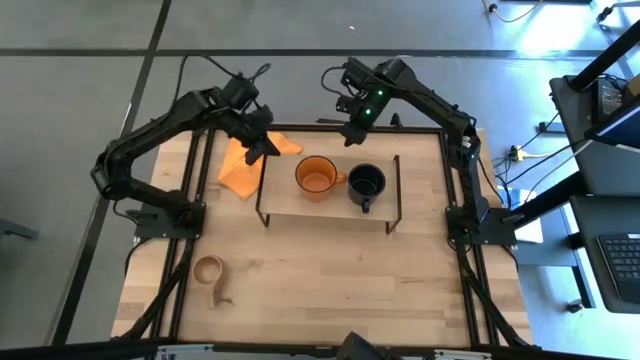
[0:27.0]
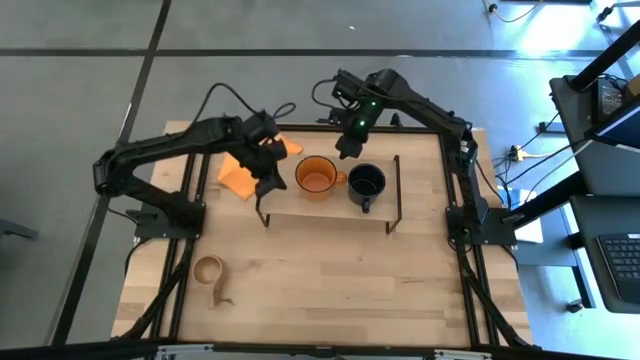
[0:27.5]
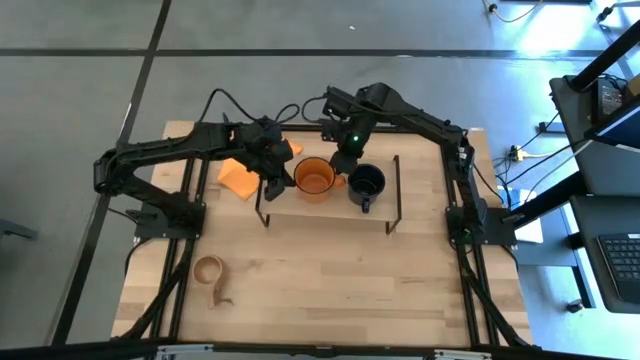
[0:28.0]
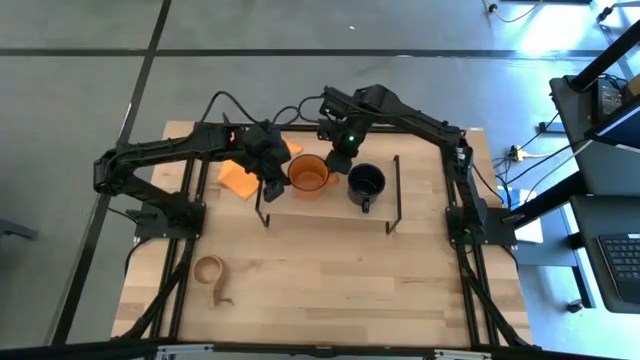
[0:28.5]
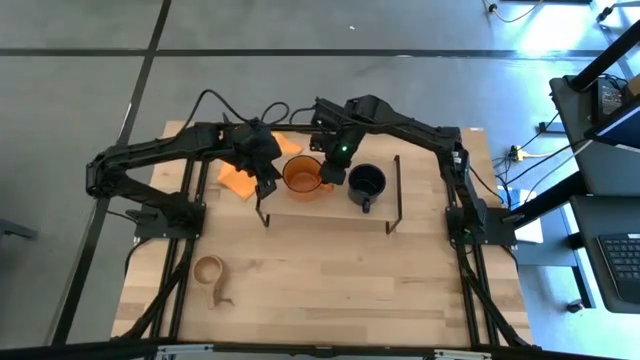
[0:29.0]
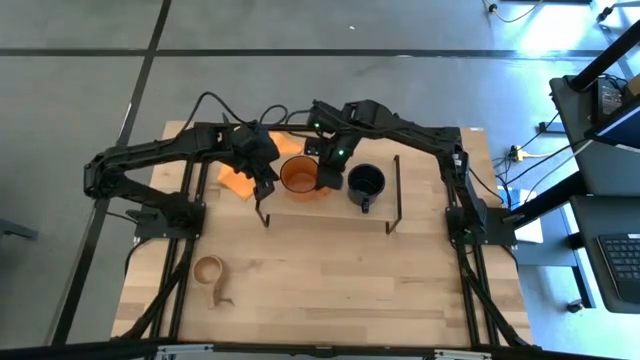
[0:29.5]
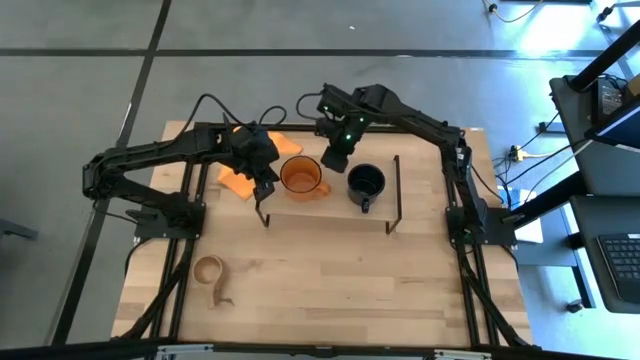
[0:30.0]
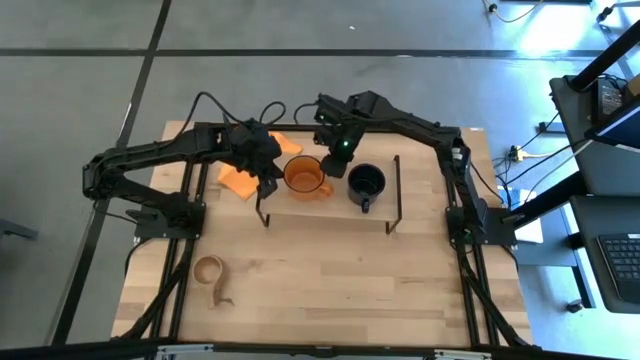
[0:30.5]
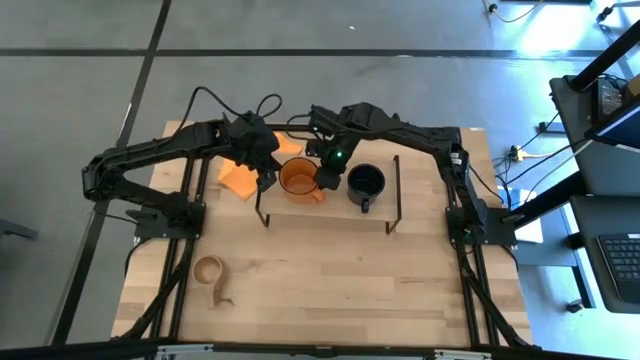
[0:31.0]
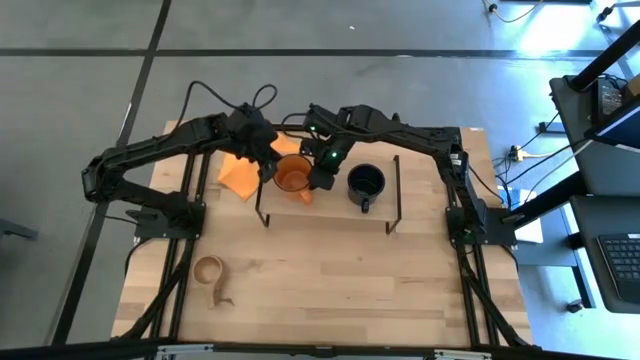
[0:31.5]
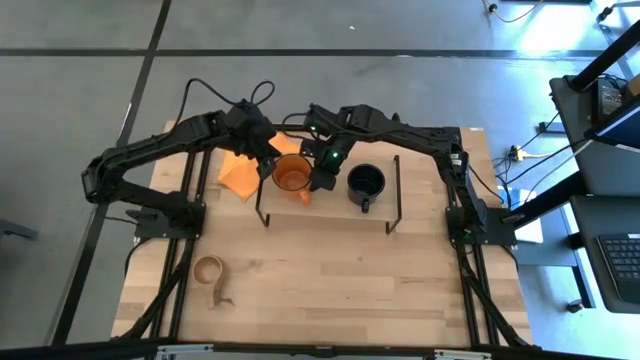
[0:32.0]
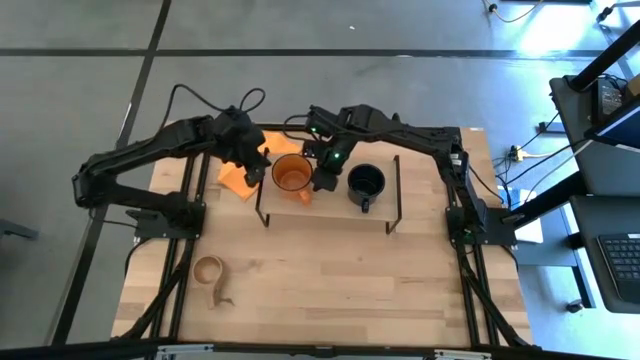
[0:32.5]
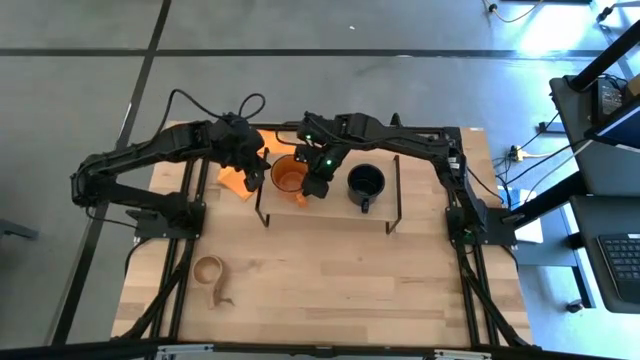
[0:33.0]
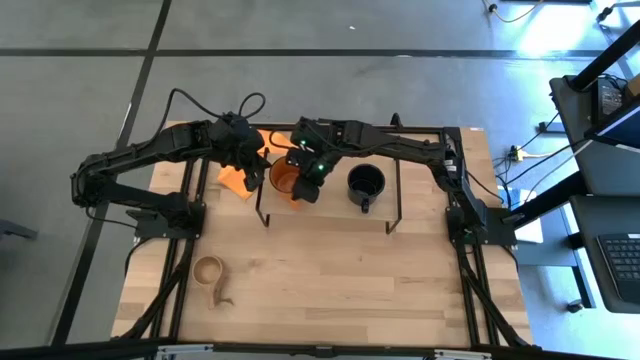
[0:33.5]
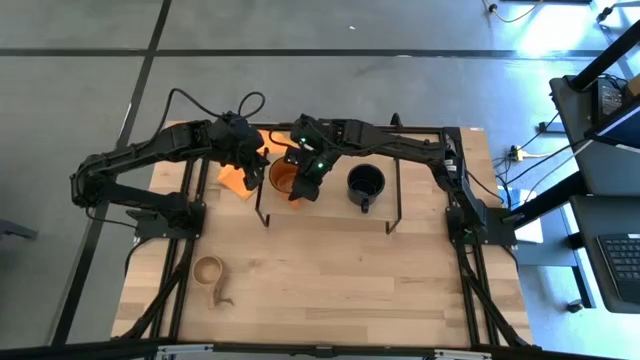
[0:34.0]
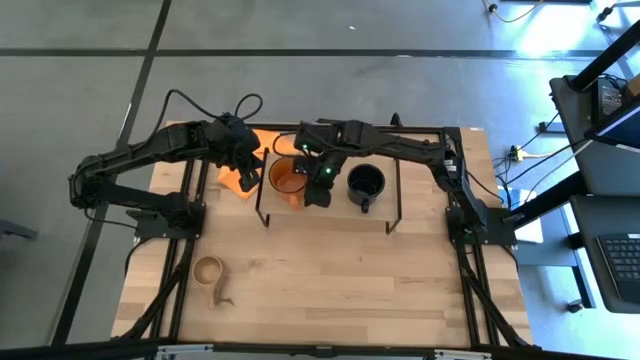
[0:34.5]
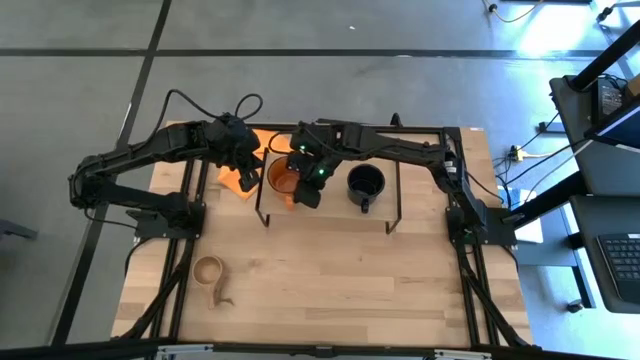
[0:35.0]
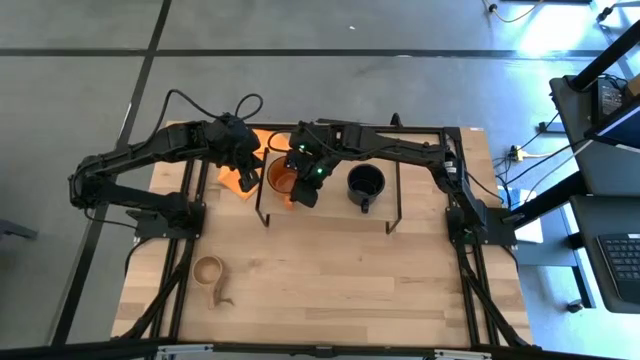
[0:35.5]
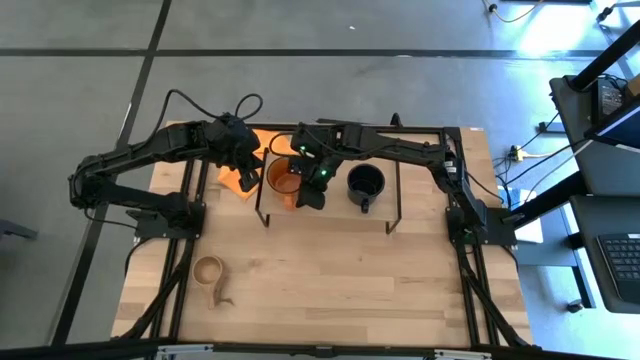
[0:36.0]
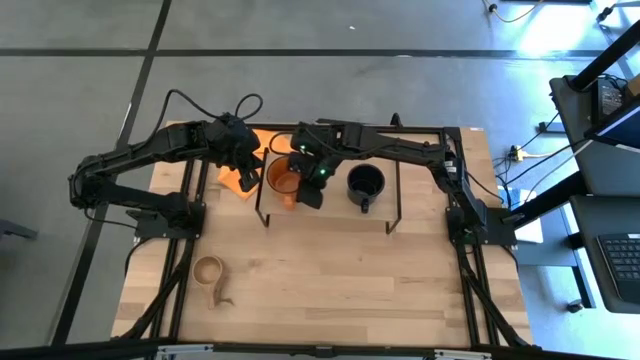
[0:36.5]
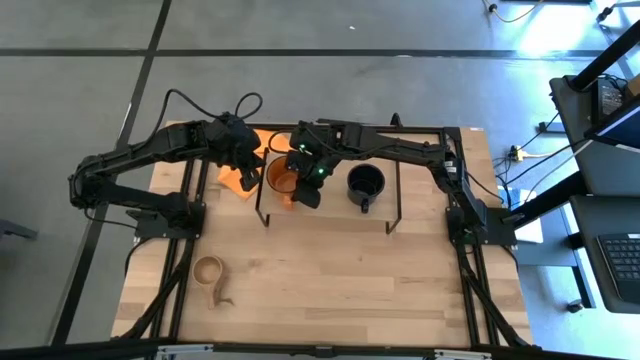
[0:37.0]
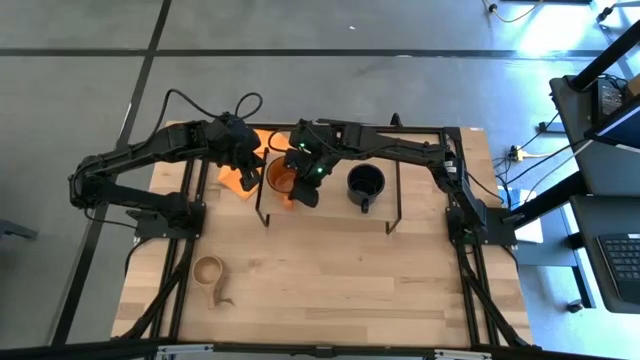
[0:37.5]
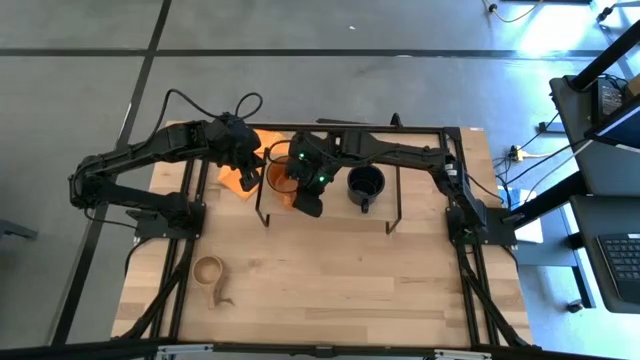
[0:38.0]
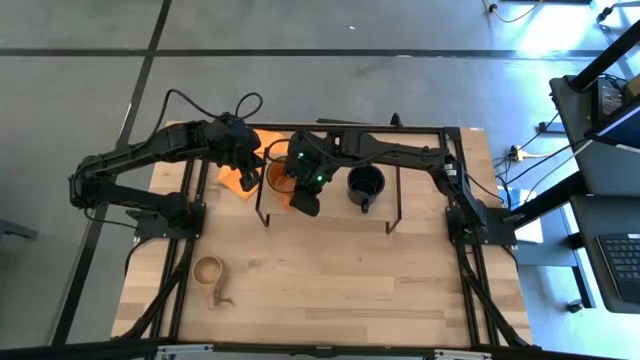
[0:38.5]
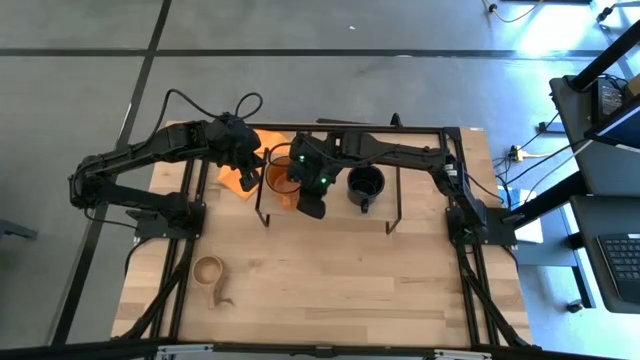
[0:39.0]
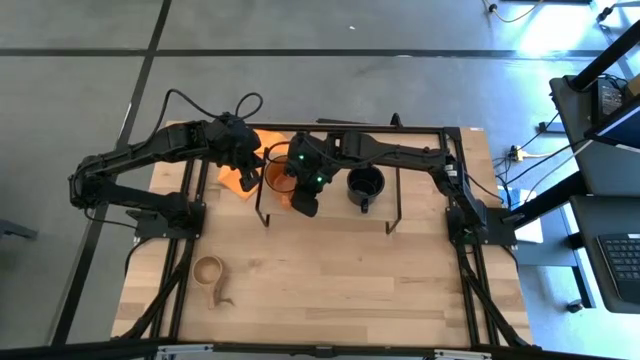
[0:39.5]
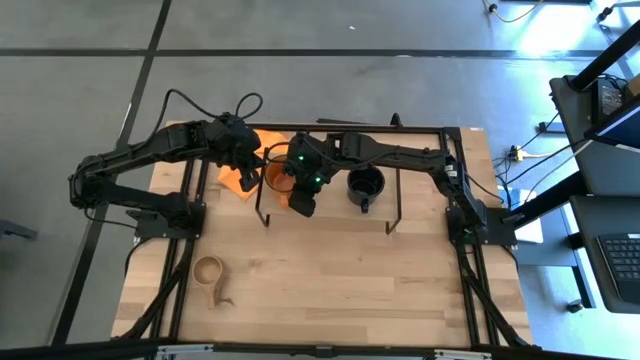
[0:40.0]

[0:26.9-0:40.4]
Task: Stack small to large cups/mugs on shelf
Put the orange mug on the shelf

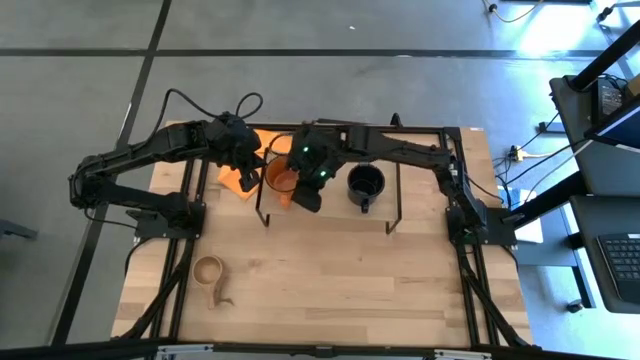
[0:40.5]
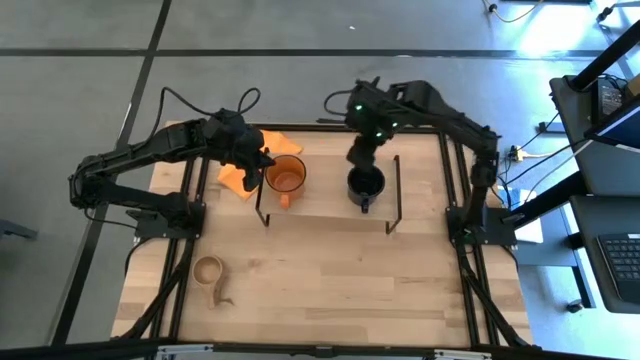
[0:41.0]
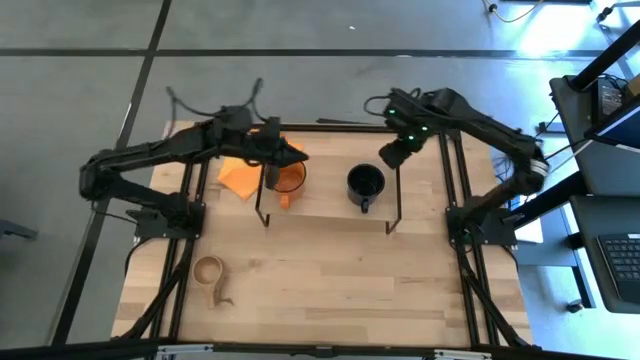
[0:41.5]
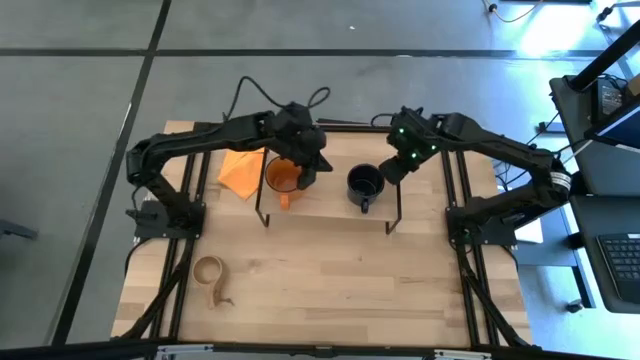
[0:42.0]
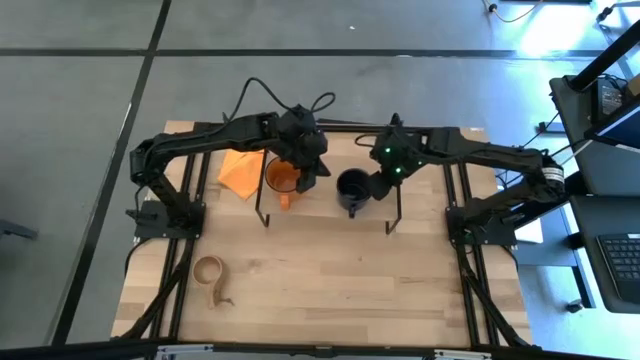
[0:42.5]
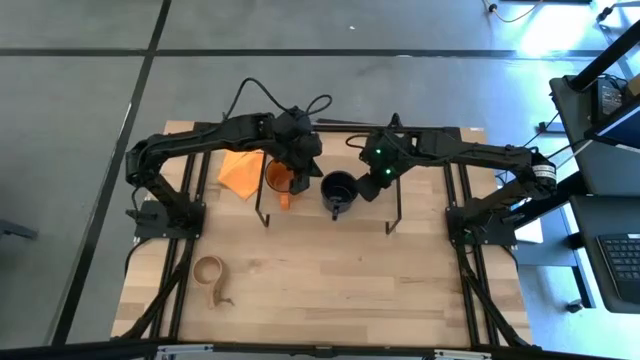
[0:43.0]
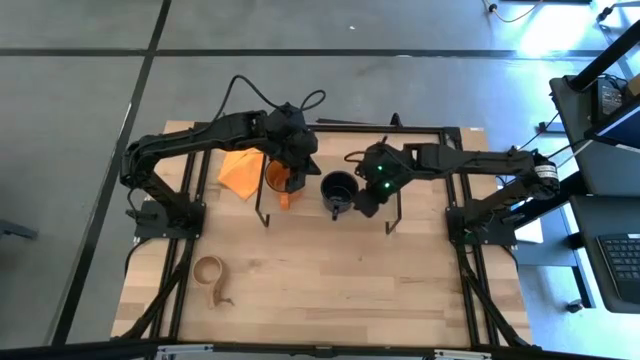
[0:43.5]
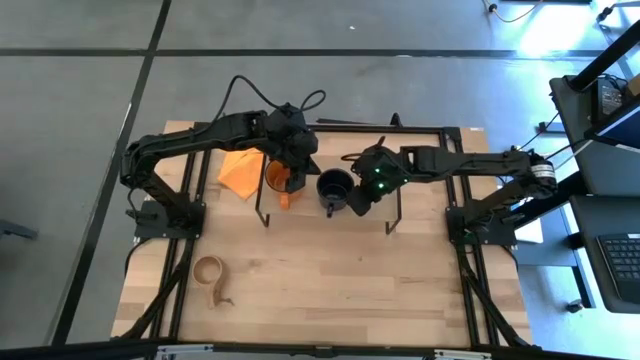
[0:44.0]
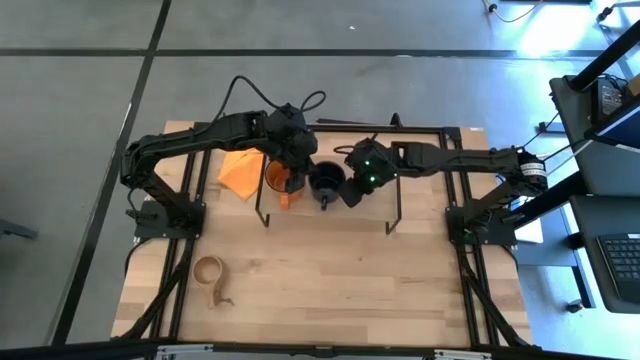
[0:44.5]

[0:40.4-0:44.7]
Adjust the blue mug on the shelf
